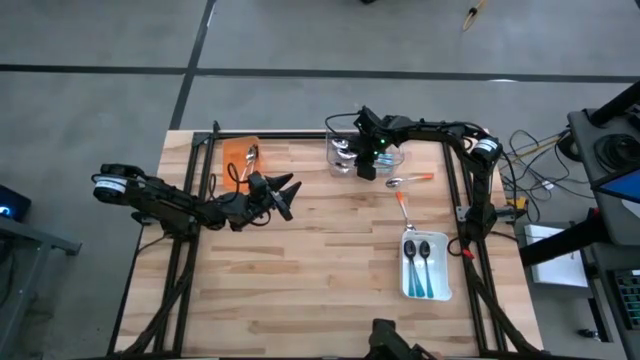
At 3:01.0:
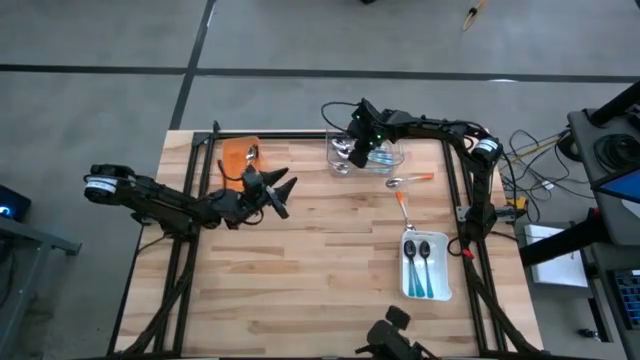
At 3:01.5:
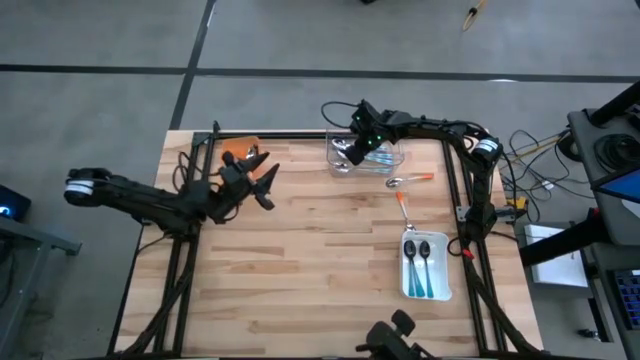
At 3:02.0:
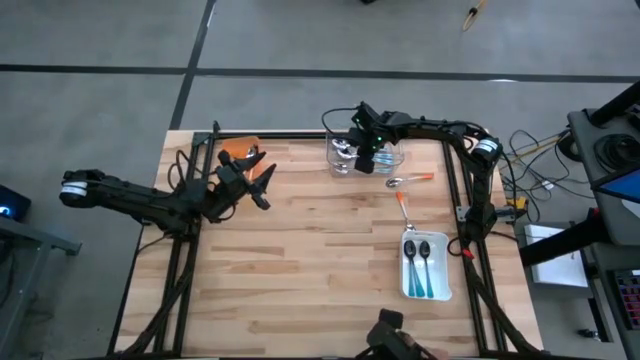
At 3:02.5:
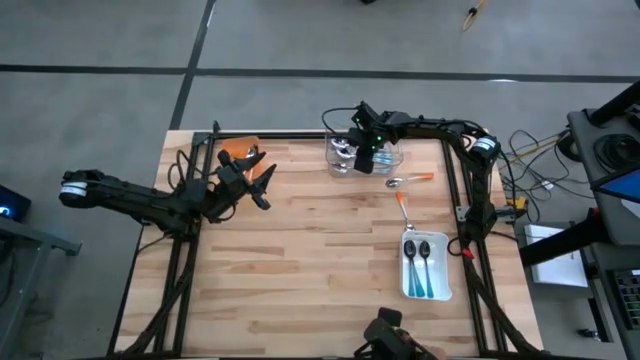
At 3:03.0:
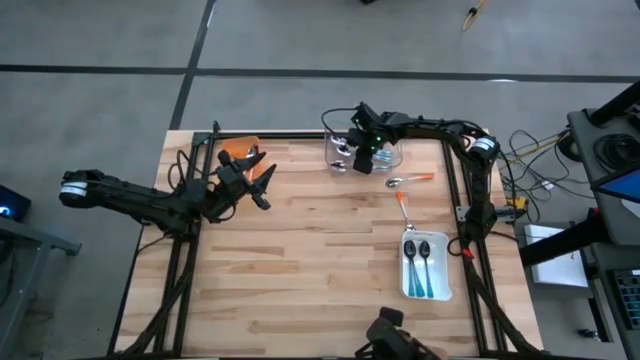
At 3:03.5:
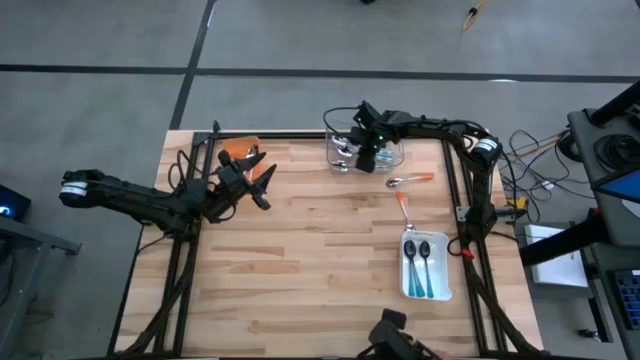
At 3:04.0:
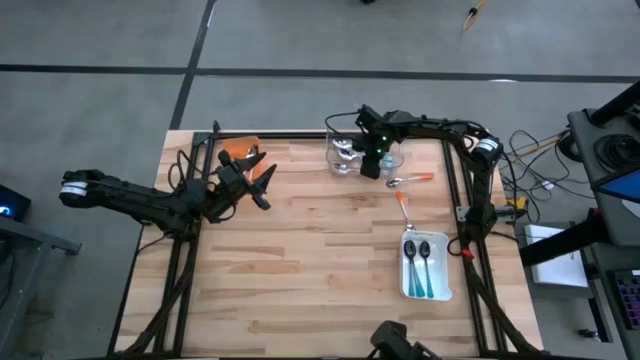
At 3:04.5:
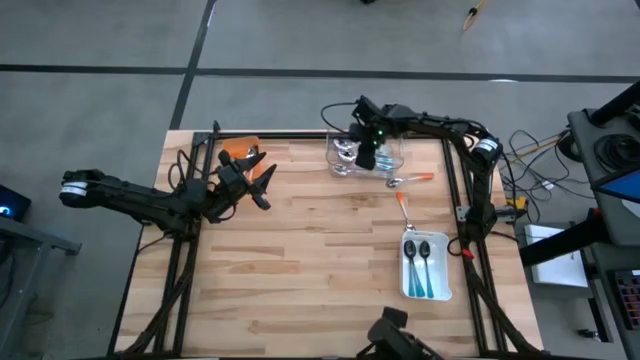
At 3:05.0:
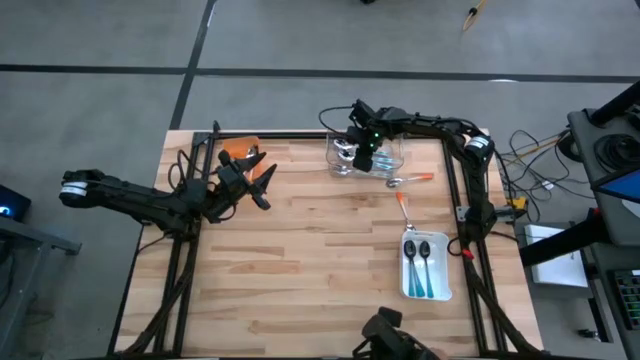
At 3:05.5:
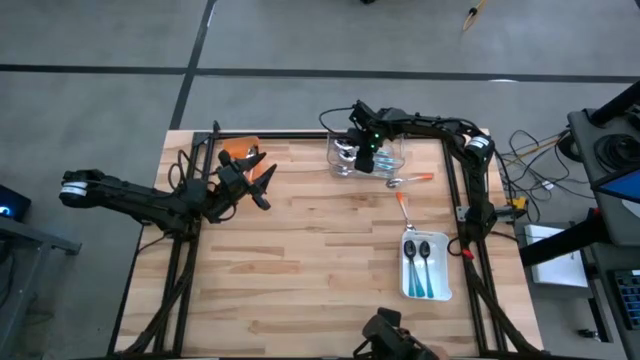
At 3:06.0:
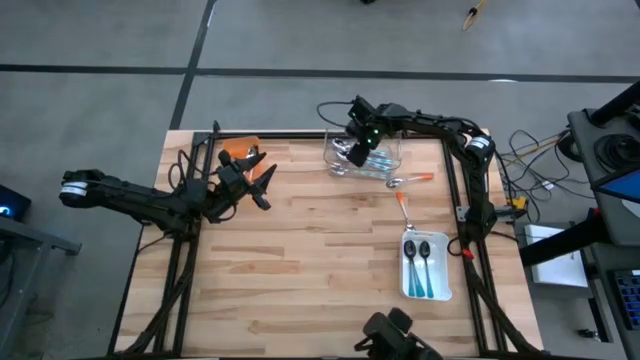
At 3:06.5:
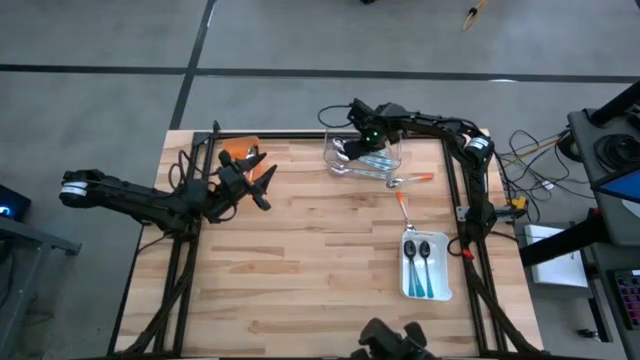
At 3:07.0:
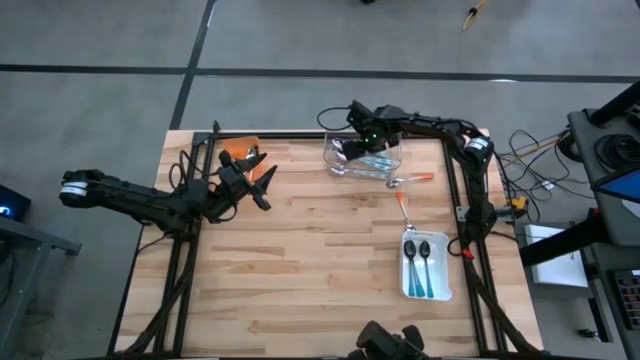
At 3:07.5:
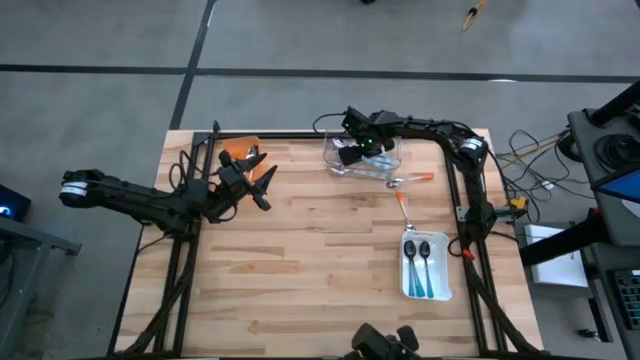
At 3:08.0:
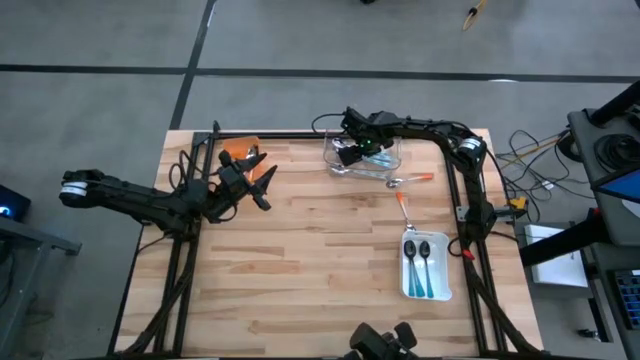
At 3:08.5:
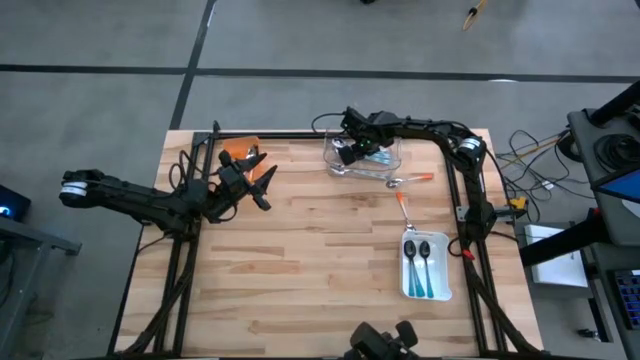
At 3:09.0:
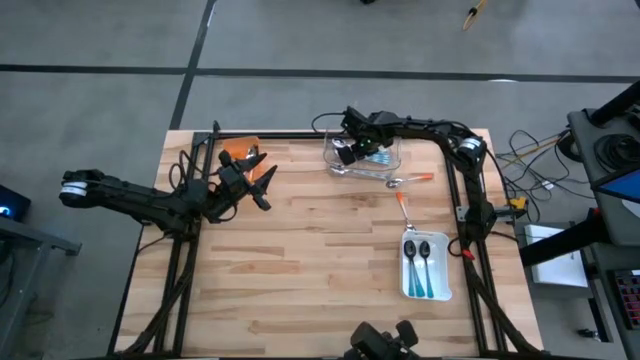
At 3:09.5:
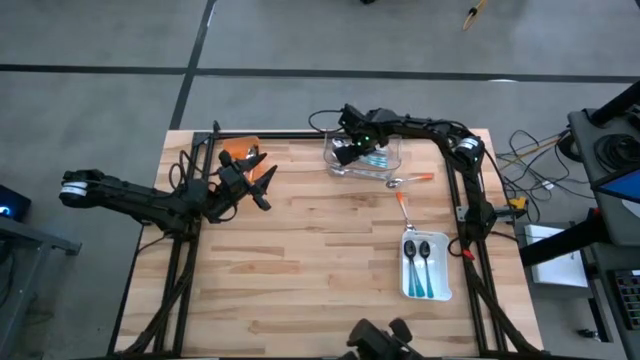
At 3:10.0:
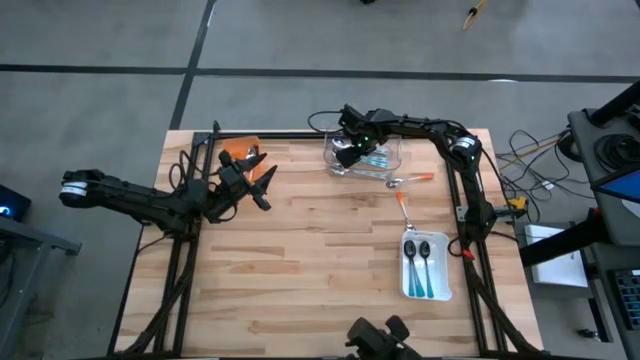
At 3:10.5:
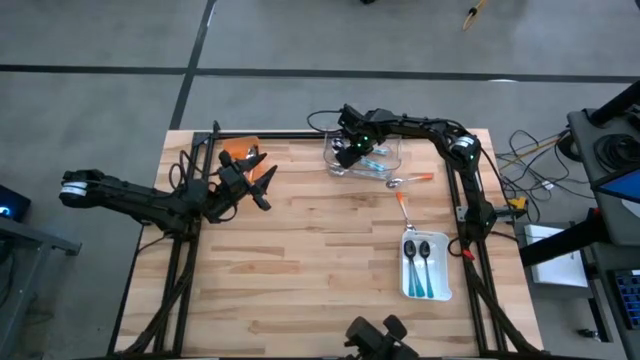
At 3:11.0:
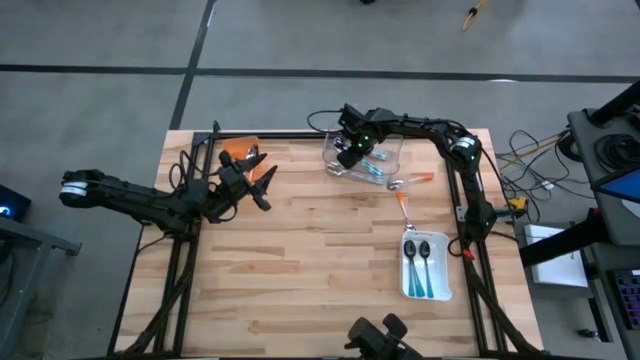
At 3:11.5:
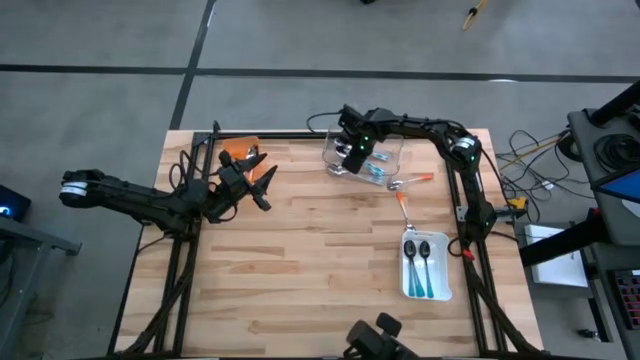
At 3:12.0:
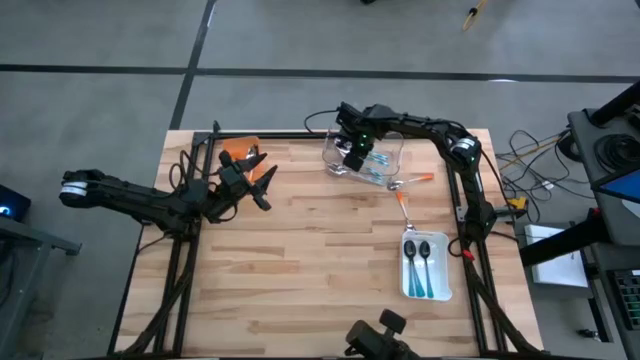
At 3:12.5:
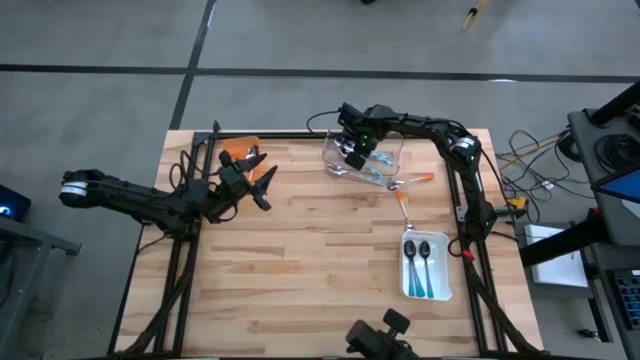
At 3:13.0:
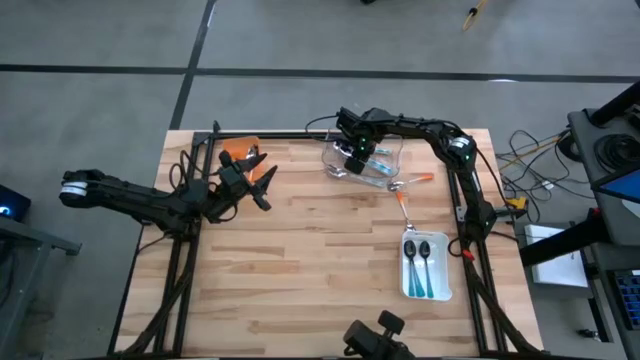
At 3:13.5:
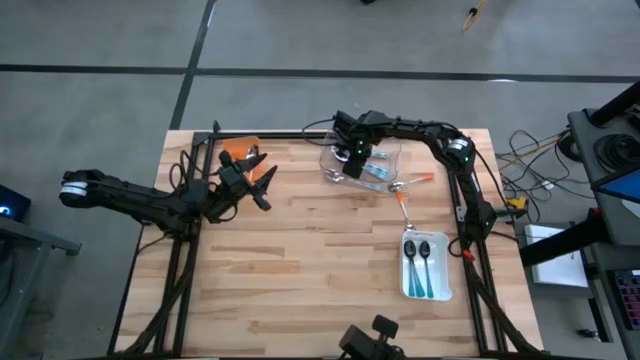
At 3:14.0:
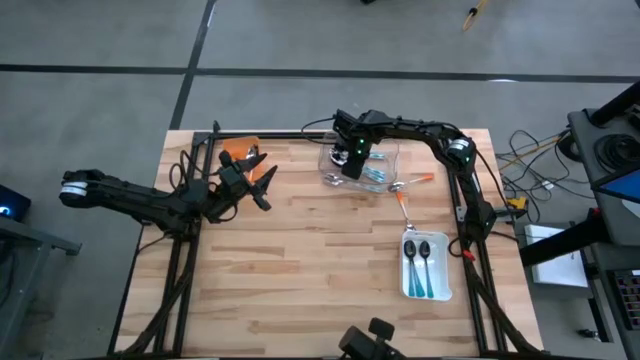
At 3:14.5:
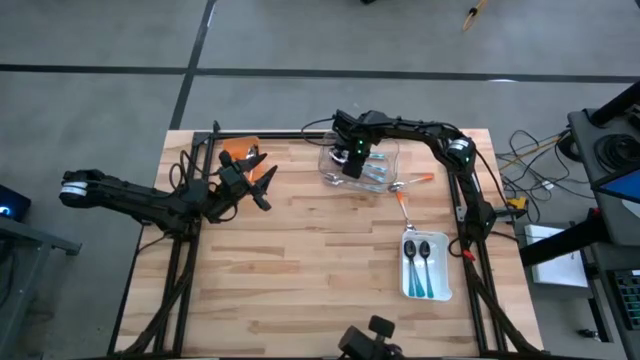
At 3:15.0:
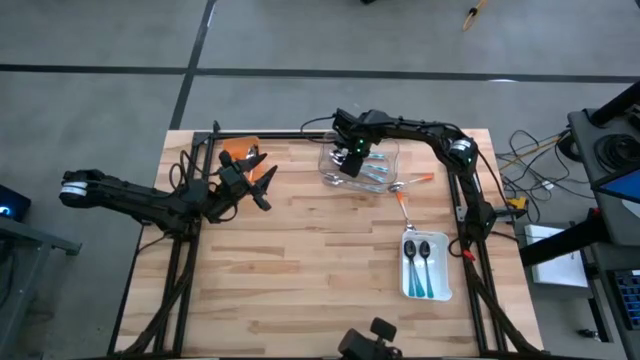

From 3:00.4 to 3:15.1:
Task: Sort silverware by color (type)
Adjust the blue patterned spoon on the transparent bin

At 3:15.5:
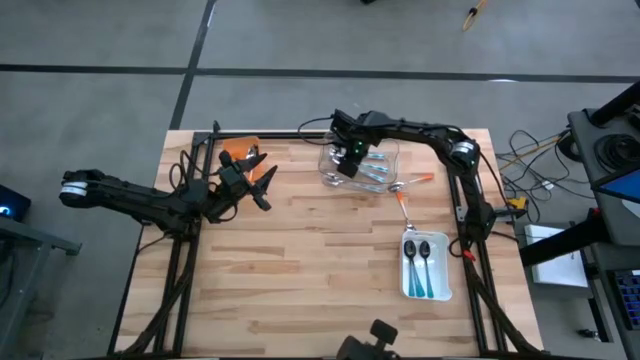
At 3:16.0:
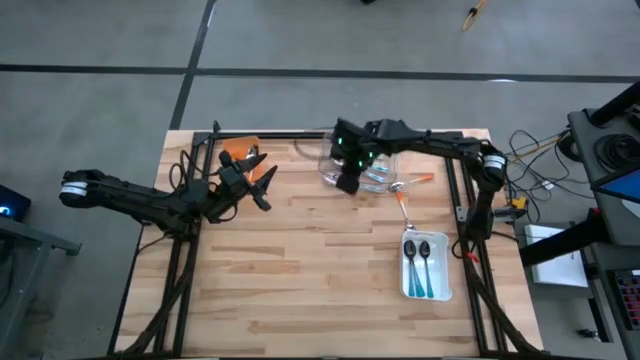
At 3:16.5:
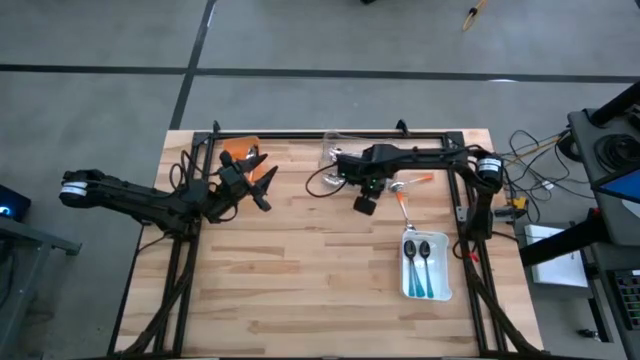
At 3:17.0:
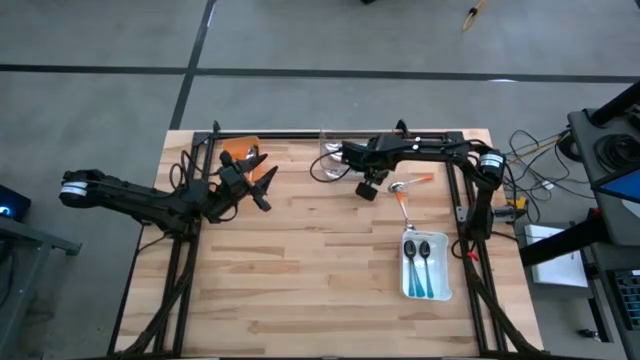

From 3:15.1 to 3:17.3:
Adjust the transparent bin

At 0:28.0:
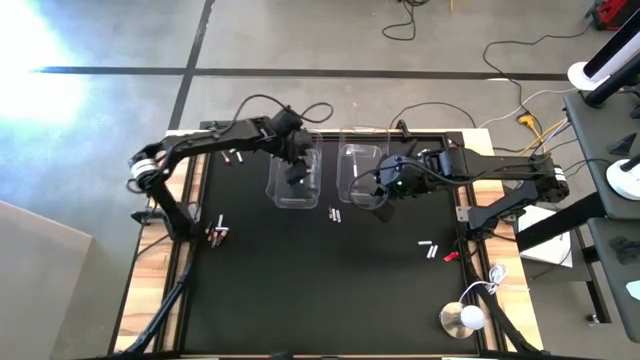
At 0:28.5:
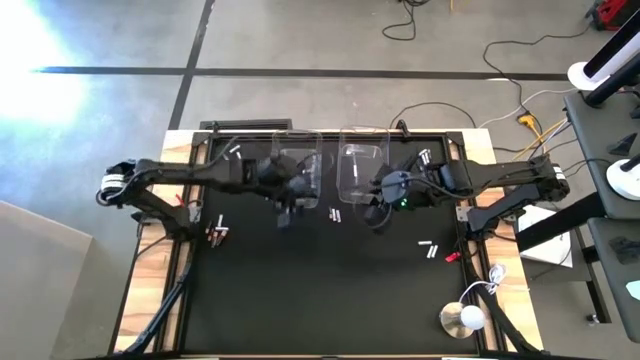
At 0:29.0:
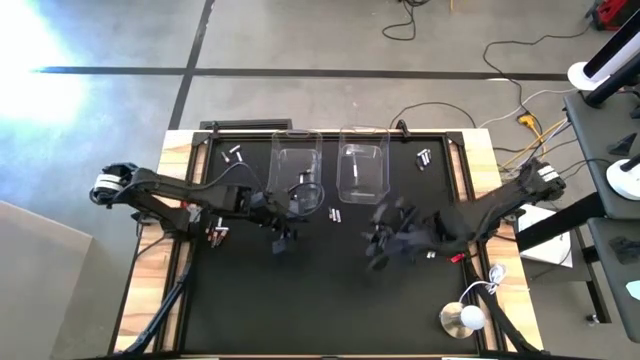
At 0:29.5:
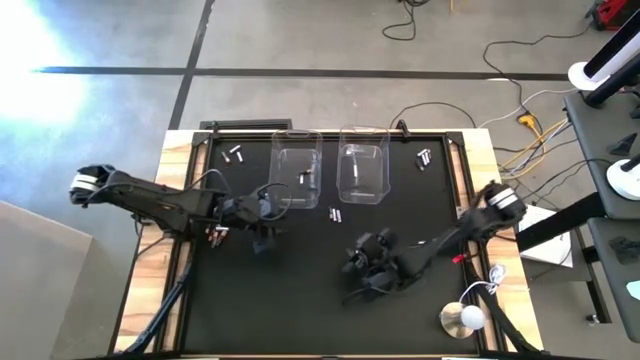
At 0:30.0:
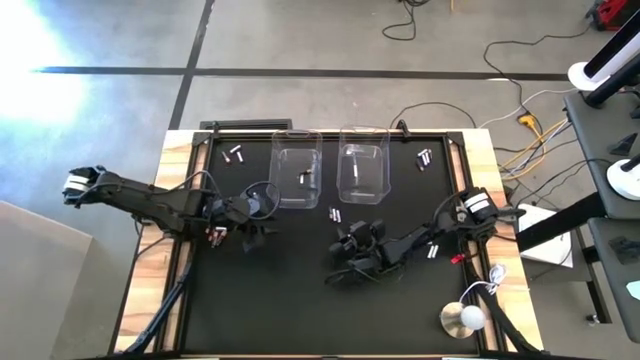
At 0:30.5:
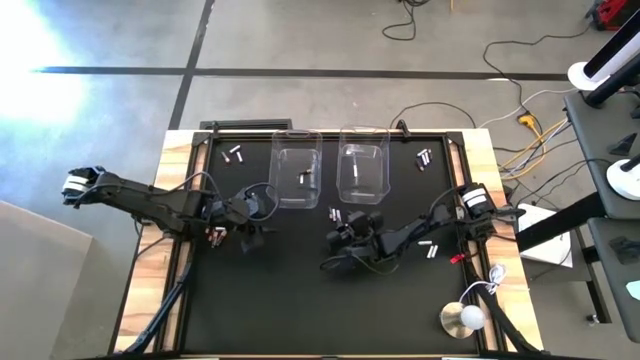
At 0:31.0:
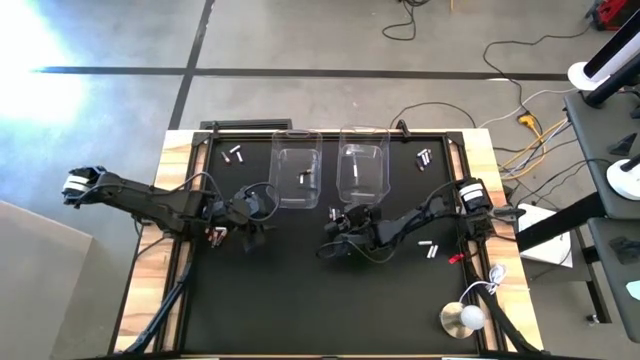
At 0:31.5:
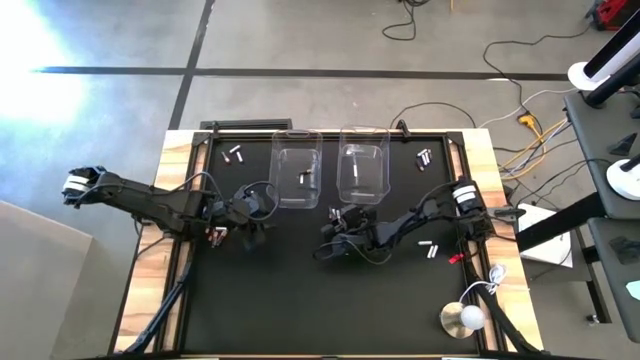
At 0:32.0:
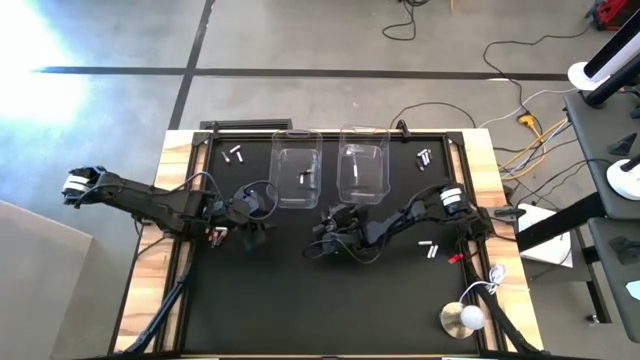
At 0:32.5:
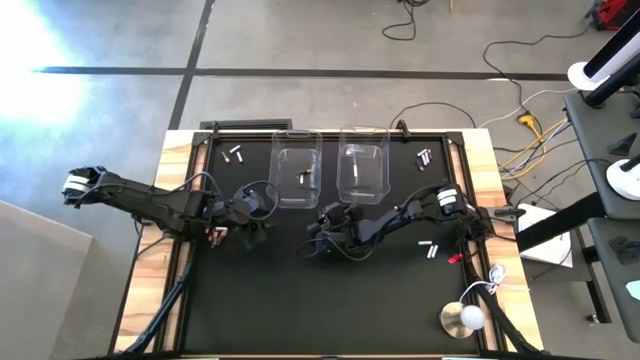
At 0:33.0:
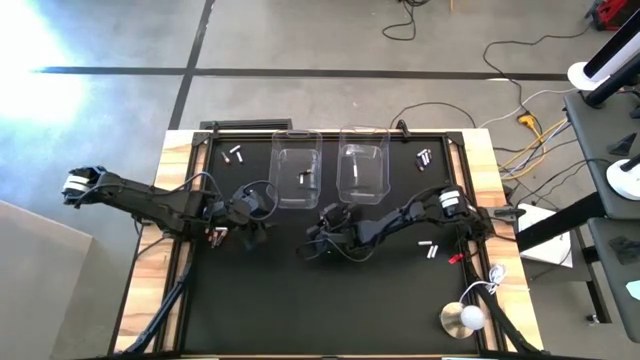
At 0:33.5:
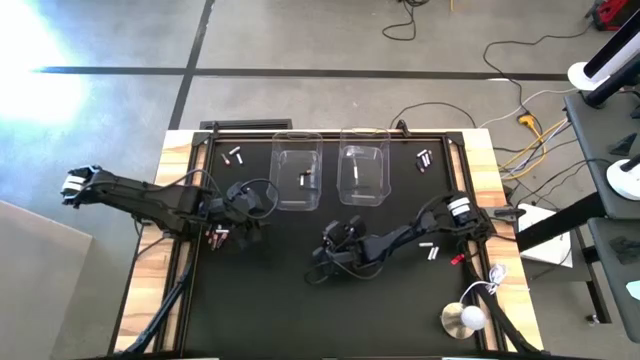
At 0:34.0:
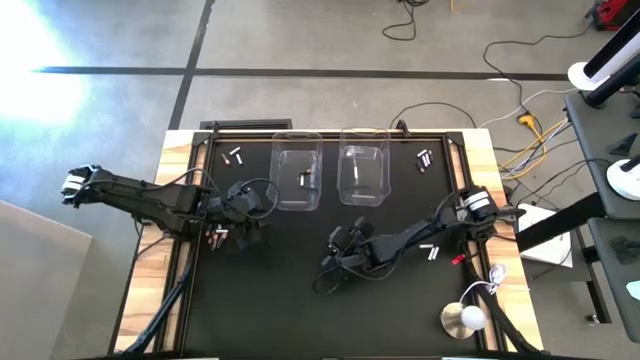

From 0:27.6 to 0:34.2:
Task: Sort batteries
Put the white battery into the right transparent bin
